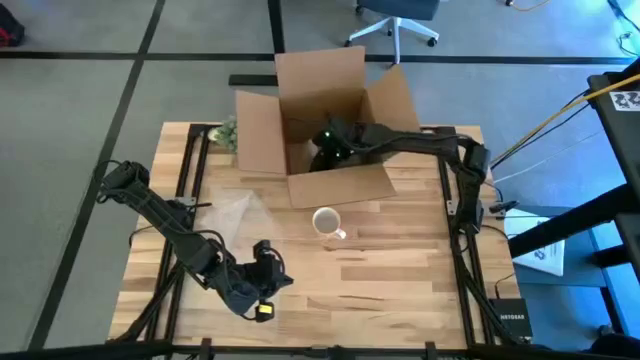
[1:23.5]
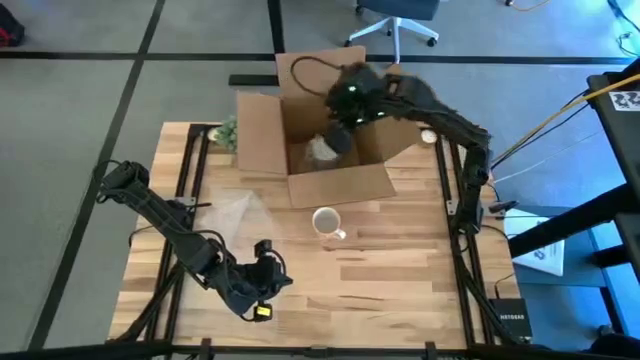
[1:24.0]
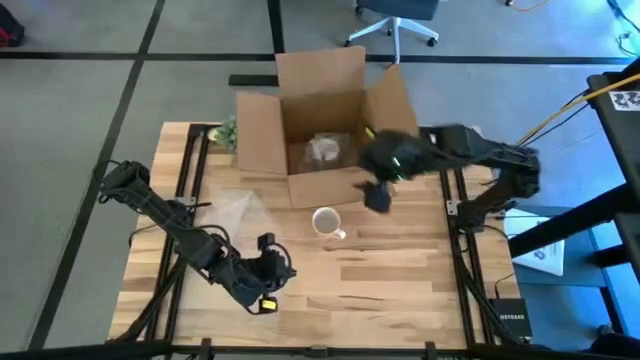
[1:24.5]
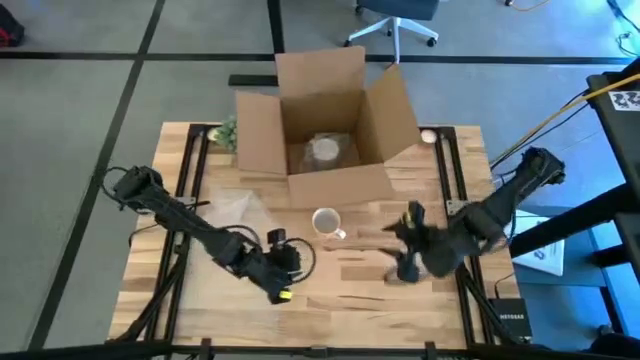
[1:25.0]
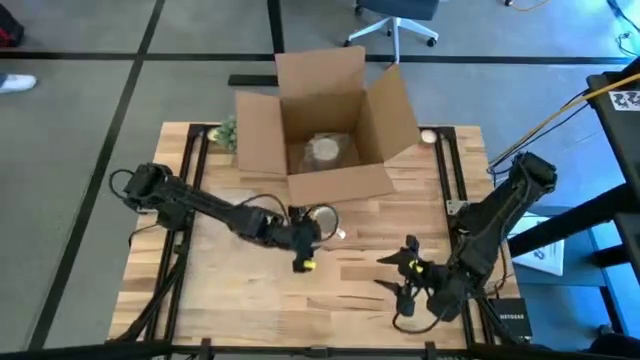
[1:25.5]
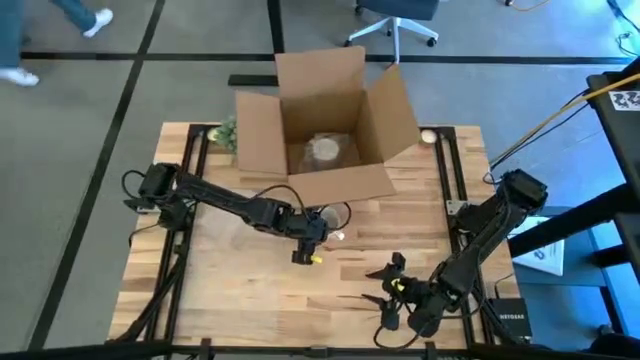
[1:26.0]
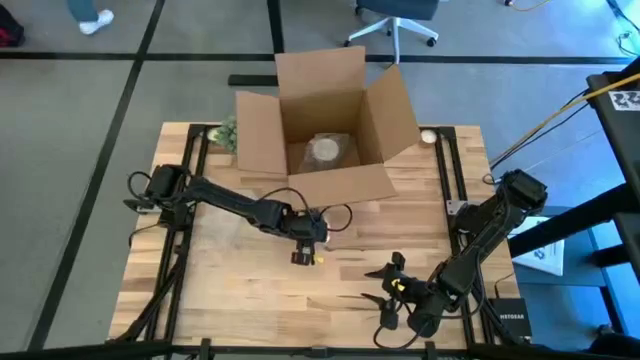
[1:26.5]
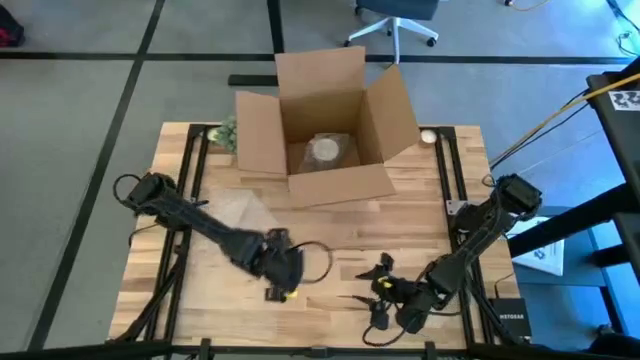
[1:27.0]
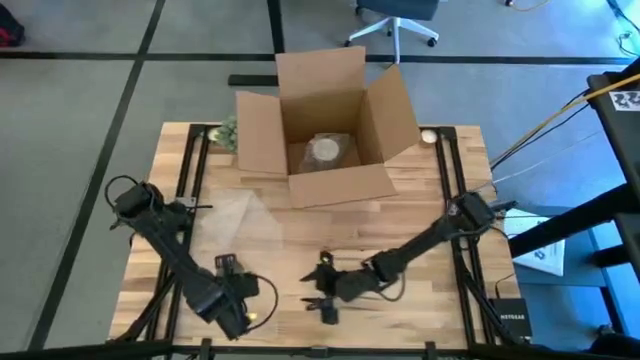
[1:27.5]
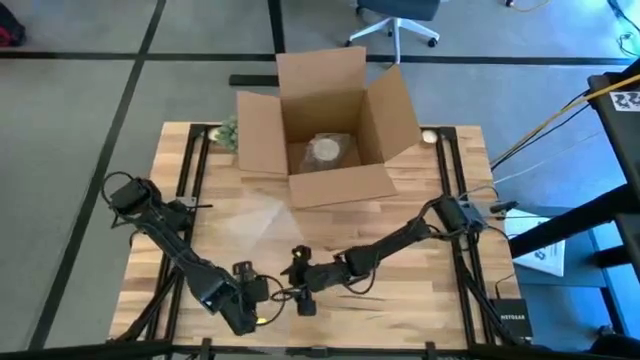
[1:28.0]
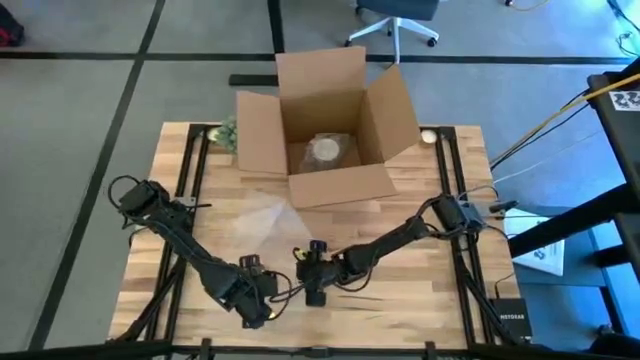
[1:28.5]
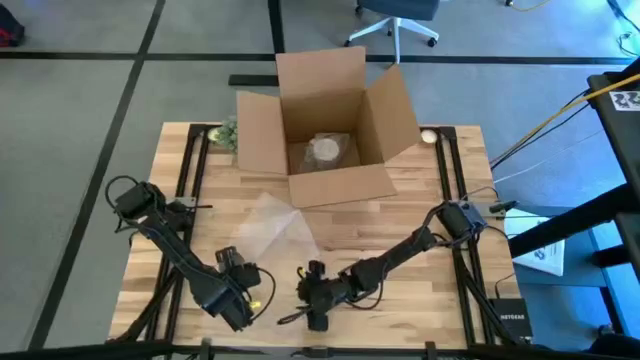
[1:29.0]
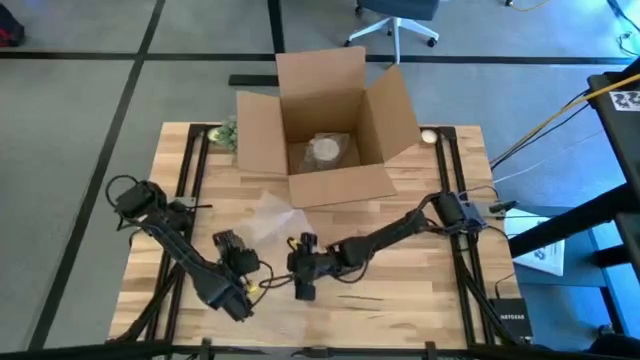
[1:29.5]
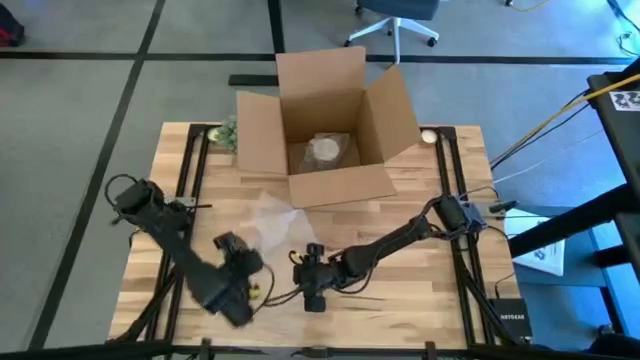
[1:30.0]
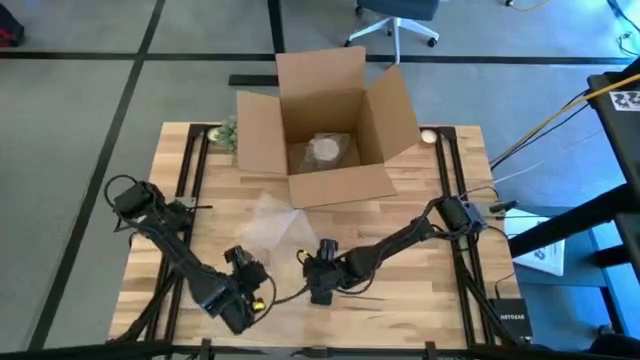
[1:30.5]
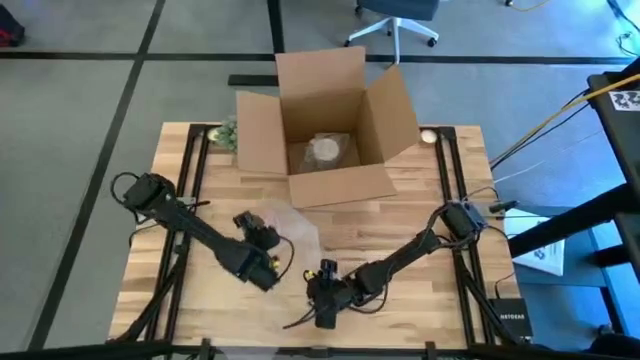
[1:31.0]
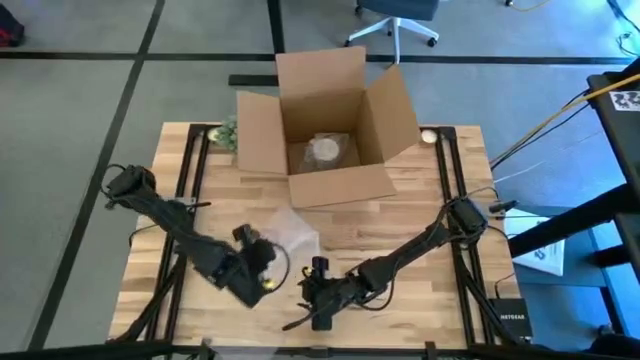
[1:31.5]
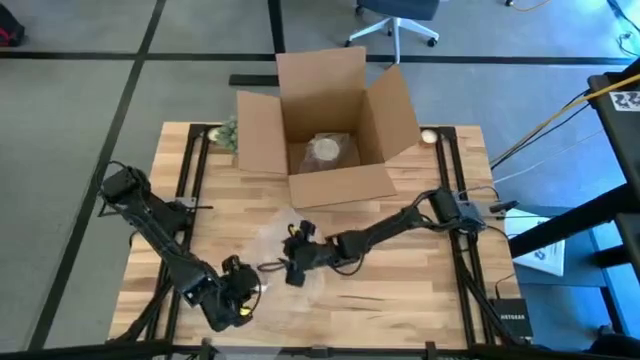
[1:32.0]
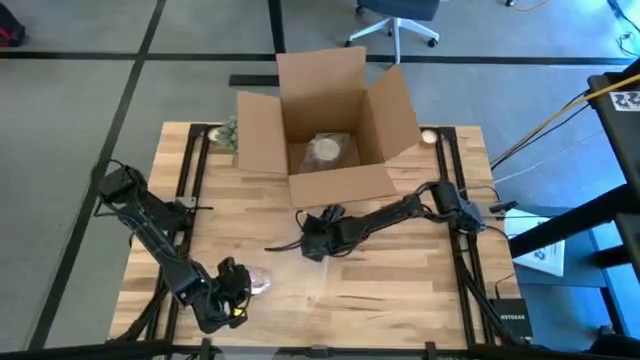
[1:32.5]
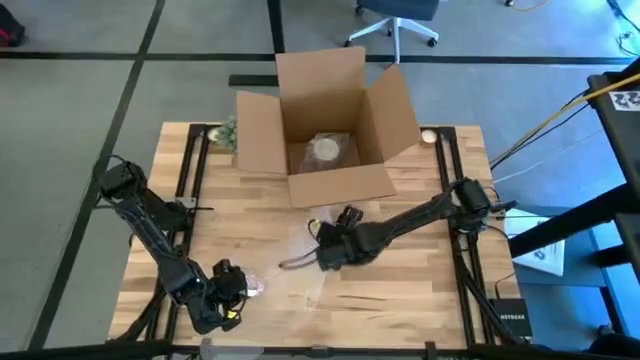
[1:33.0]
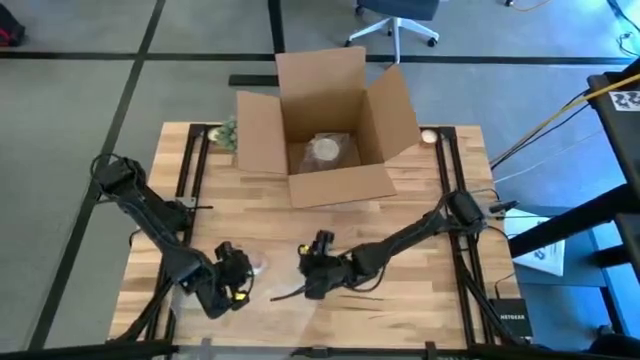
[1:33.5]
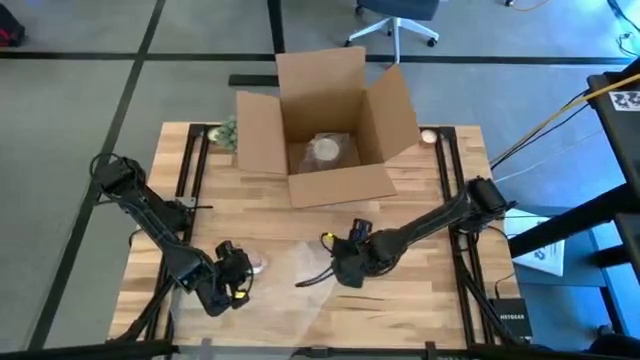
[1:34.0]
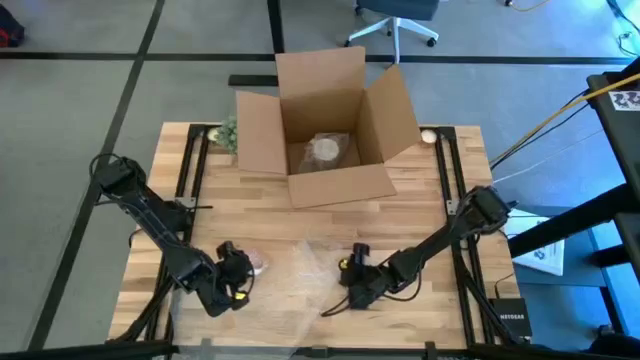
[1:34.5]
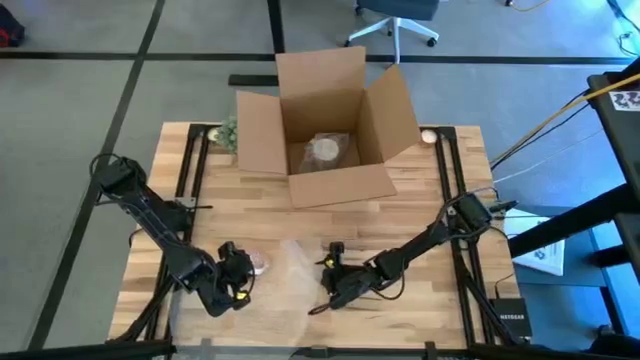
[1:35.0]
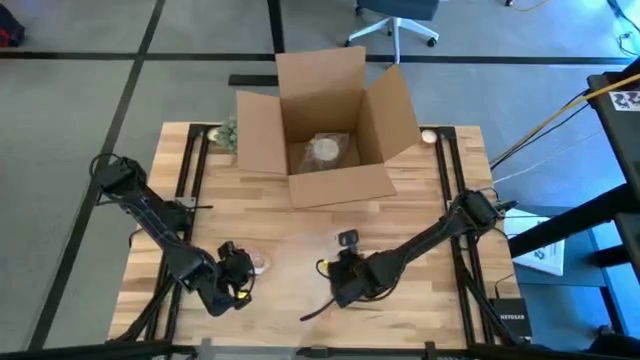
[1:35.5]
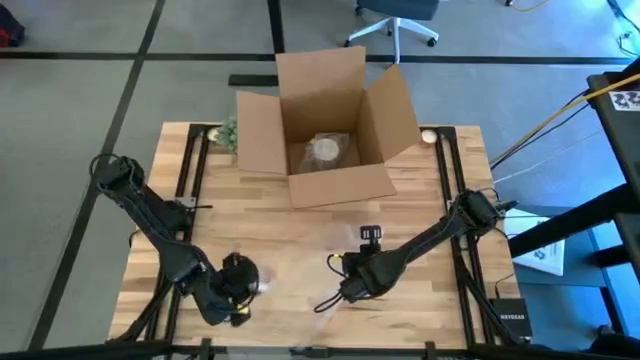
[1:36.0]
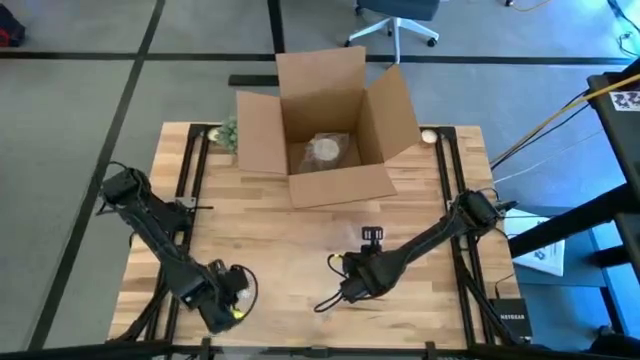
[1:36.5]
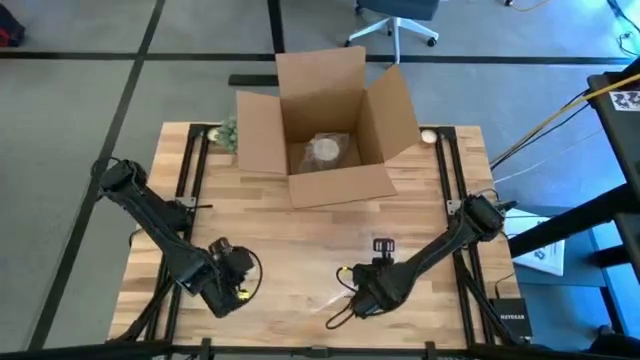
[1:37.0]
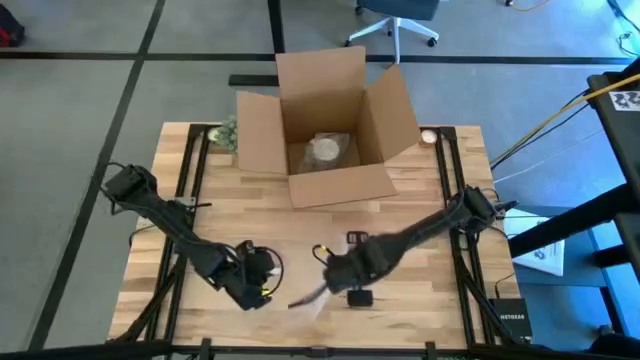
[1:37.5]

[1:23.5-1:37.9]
Task: wrap mug
Wrap the orange mug with transparent bubble wrap

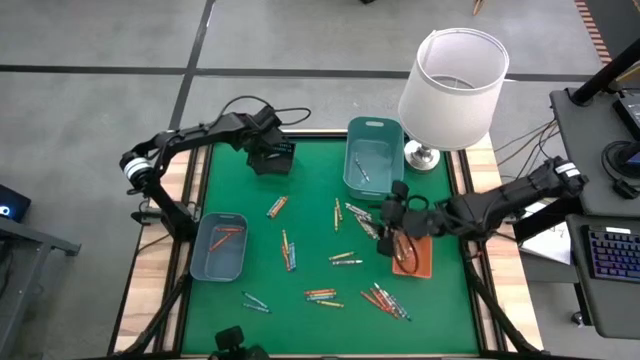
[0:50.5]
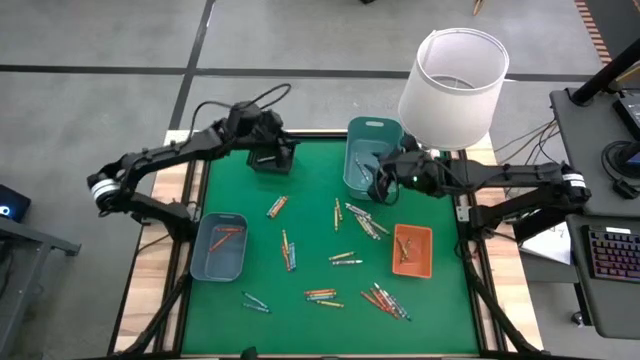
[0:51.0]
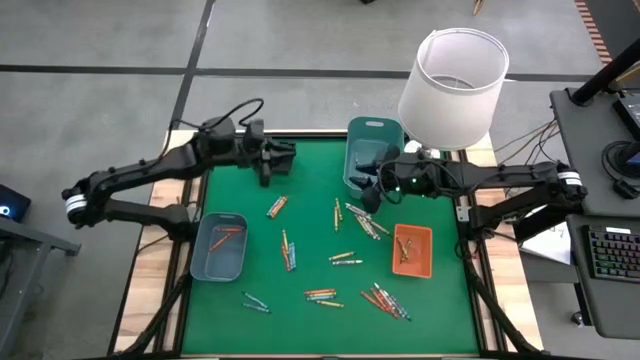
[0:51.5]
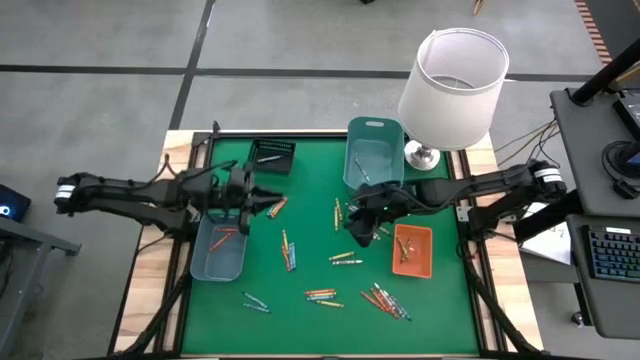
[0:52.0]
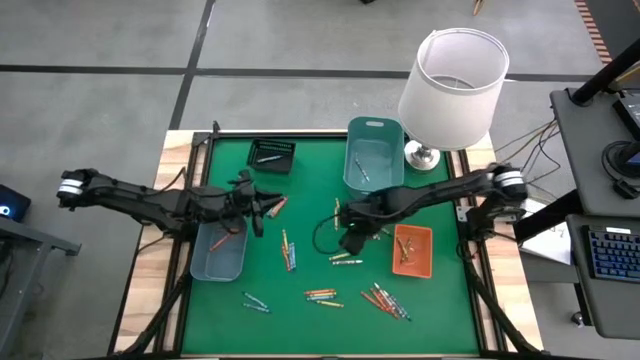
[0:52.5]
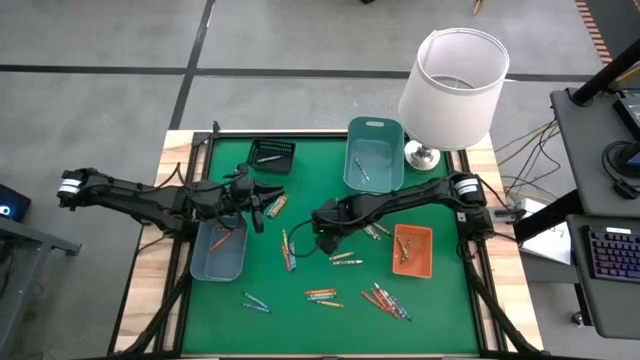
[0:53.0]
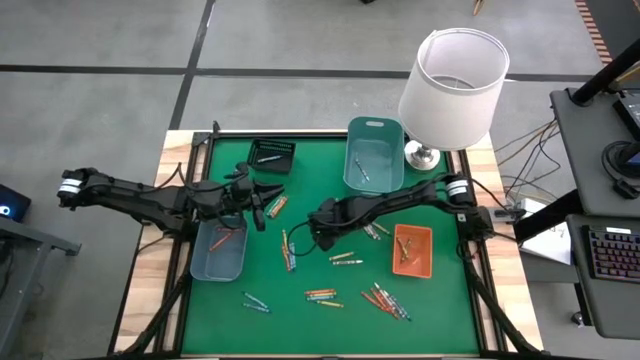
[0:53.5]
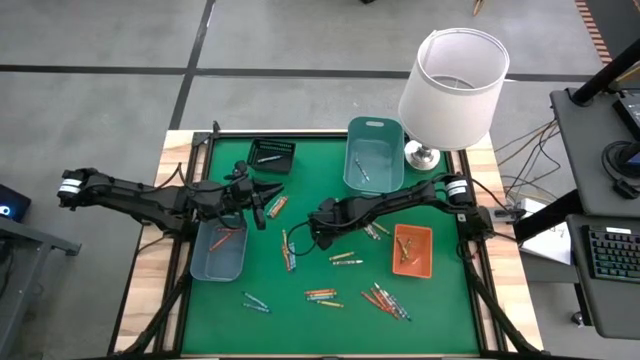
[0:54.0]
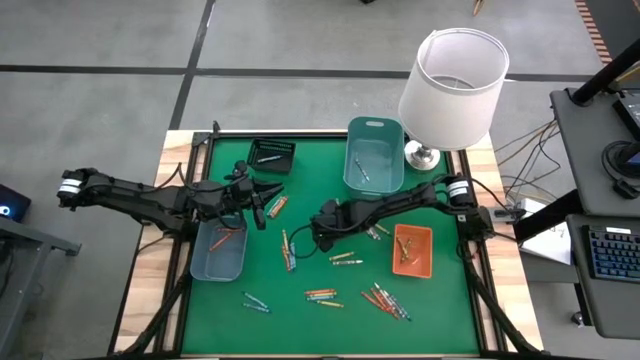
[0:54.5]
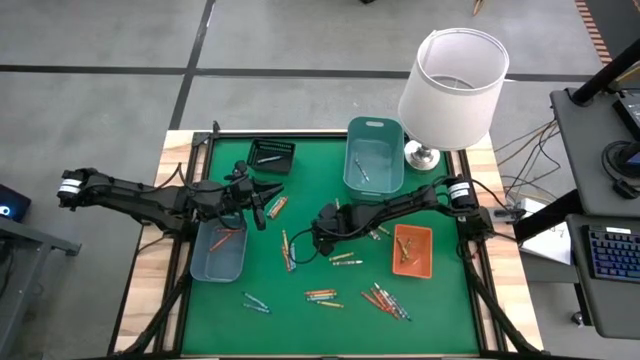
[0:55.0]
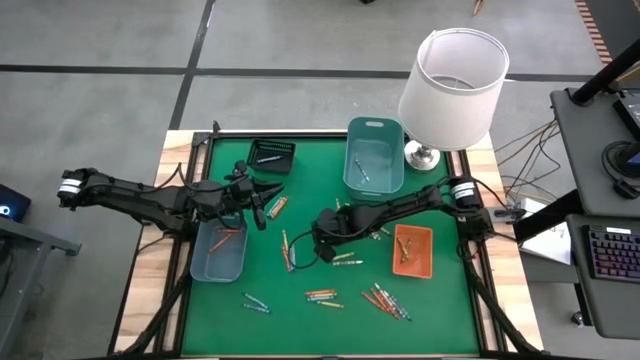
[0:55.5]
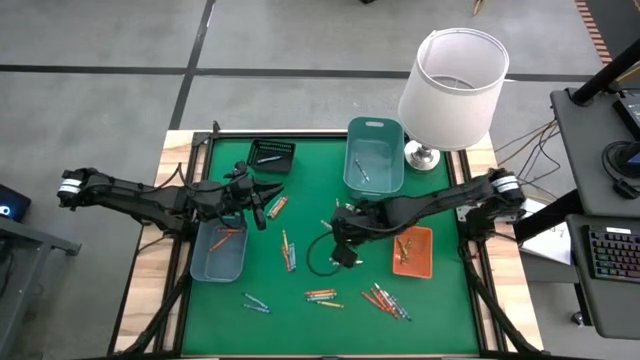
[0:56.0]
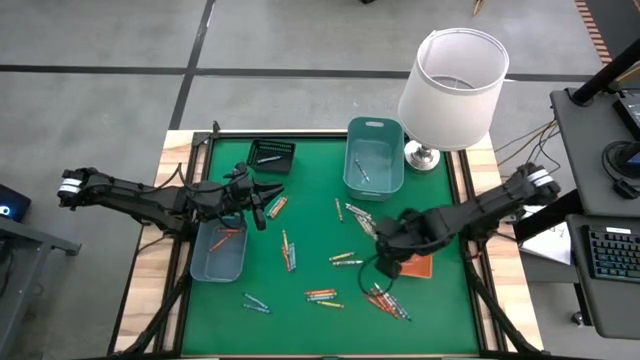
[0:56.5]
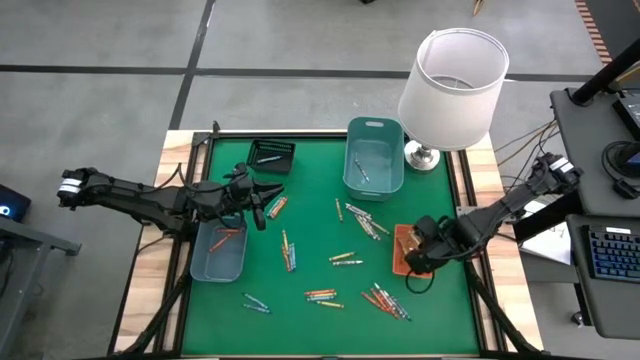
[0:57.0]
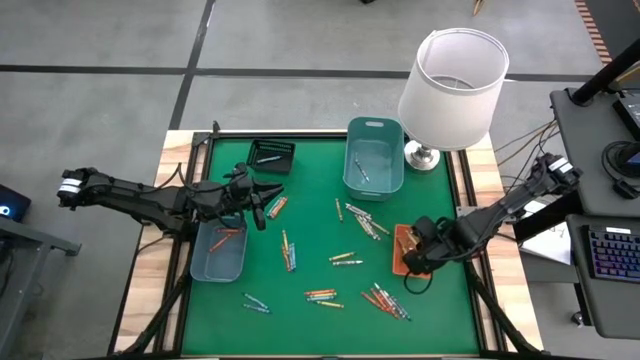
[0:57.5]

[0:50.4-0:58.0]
Task: Sort crayons
Put the green crayon into the orange bin
